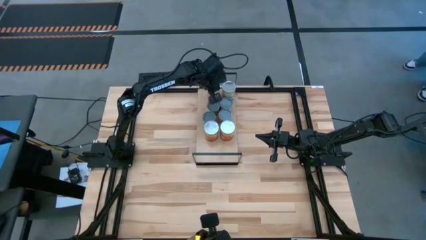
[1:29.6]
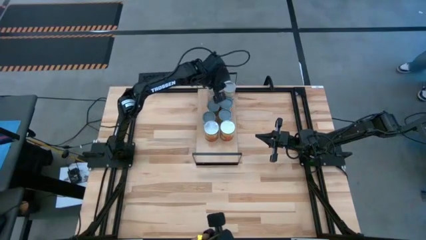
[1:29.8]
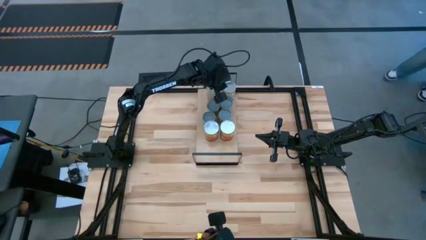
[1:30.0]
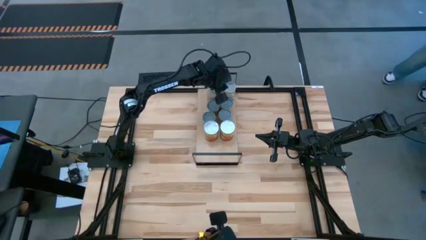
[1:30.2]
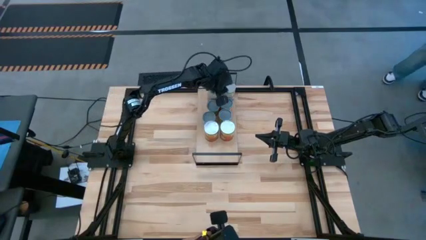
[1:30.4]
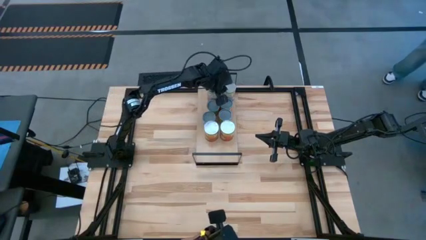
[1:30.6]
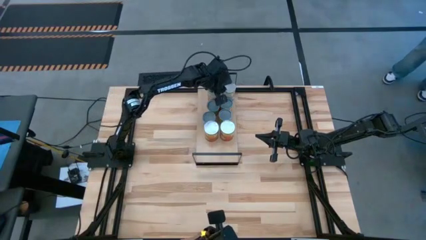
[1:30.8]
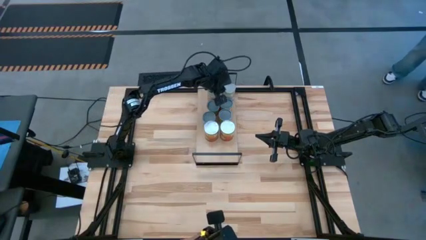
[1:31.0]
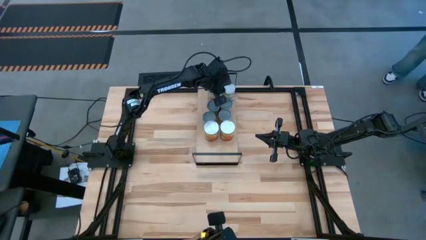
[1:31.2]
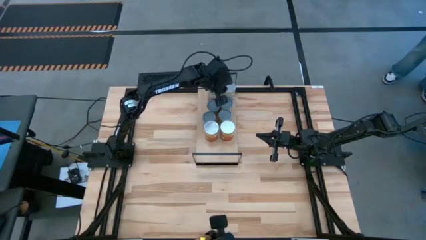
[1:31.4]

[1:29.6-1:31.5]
Task: Pick and place cans onto a shelf
Adjust the blue can

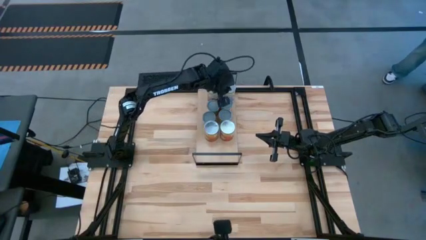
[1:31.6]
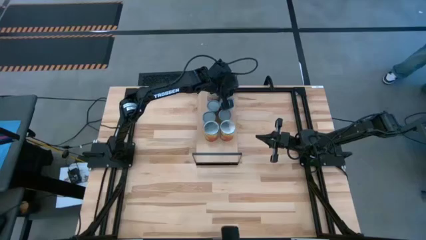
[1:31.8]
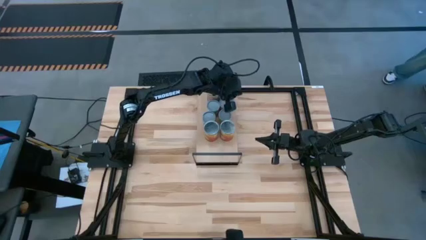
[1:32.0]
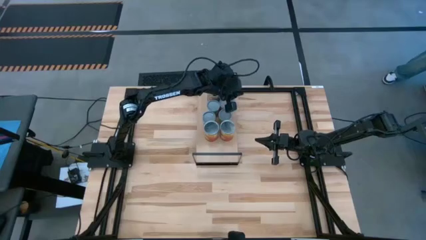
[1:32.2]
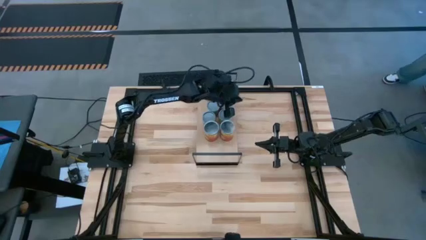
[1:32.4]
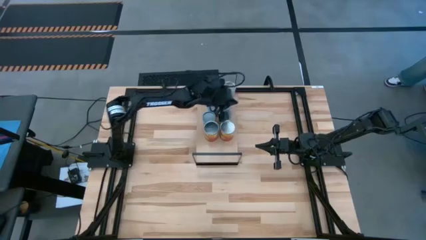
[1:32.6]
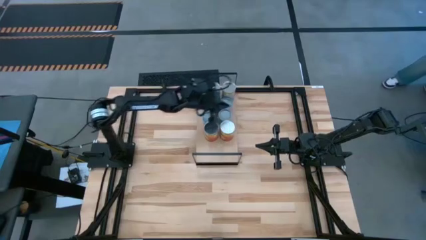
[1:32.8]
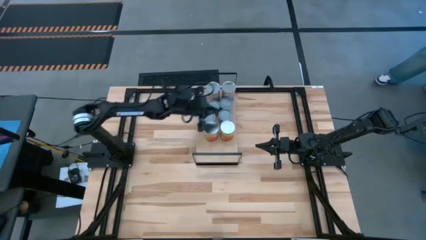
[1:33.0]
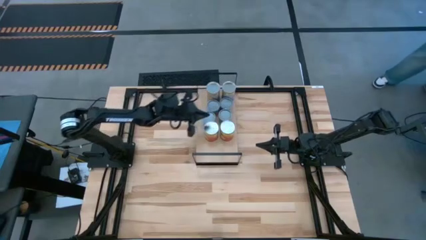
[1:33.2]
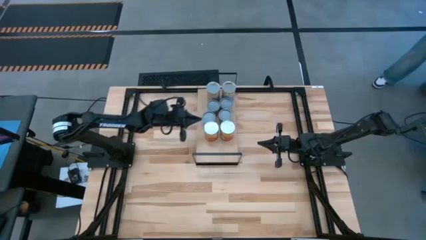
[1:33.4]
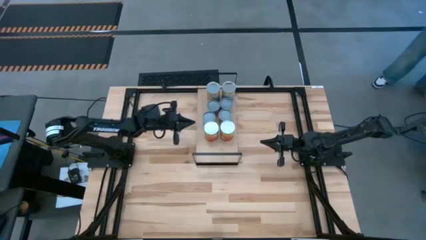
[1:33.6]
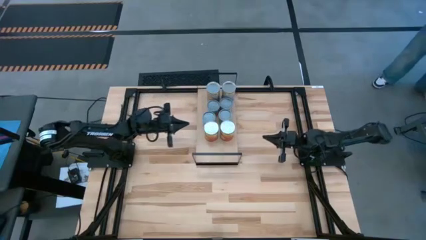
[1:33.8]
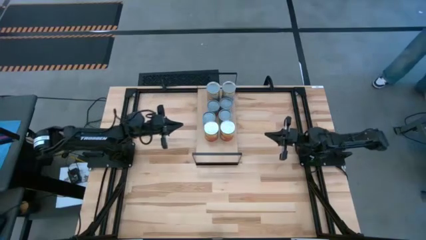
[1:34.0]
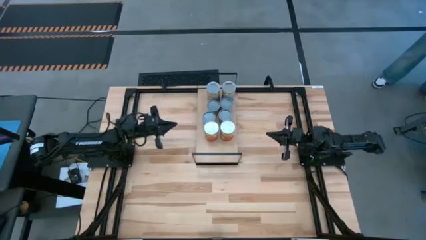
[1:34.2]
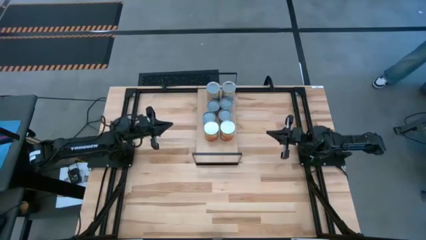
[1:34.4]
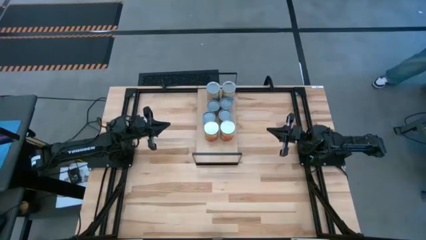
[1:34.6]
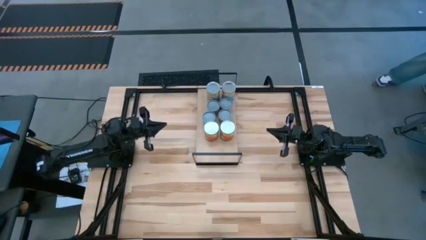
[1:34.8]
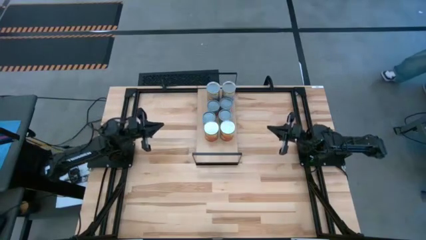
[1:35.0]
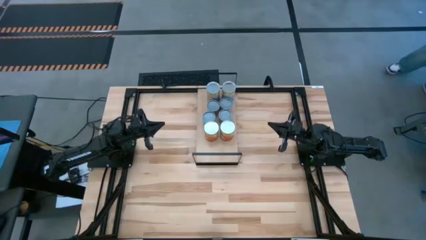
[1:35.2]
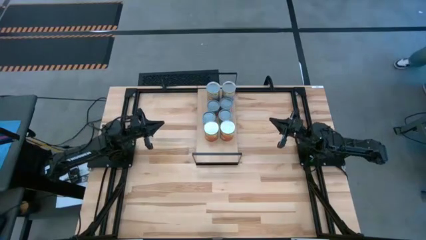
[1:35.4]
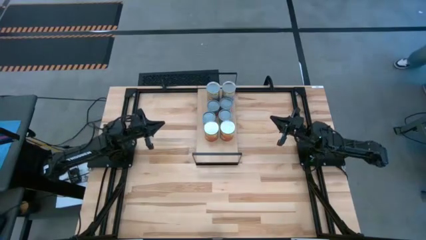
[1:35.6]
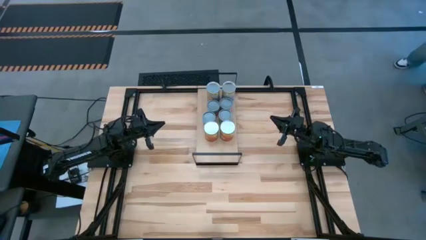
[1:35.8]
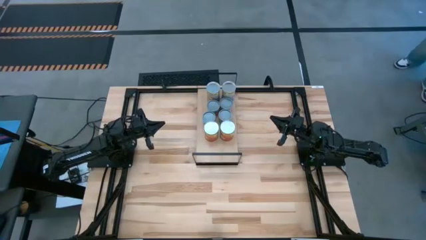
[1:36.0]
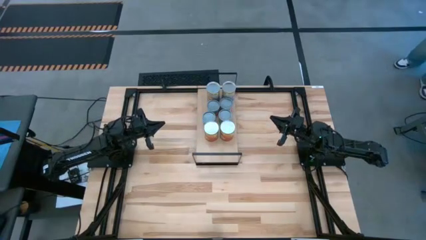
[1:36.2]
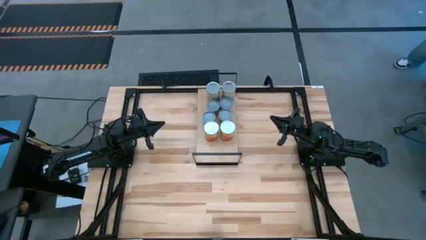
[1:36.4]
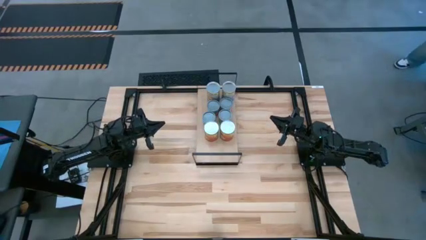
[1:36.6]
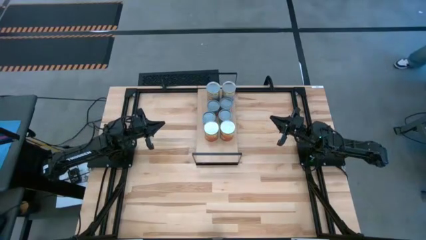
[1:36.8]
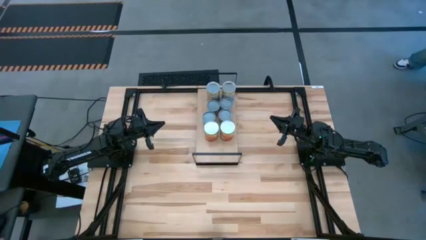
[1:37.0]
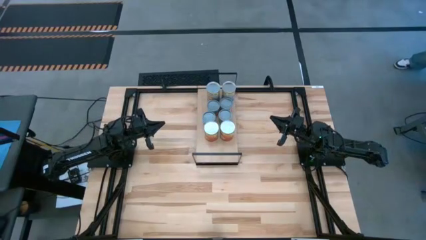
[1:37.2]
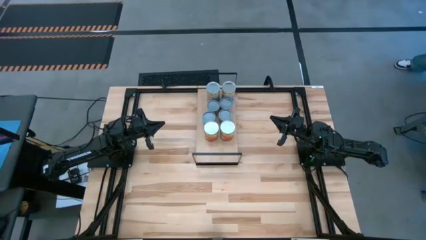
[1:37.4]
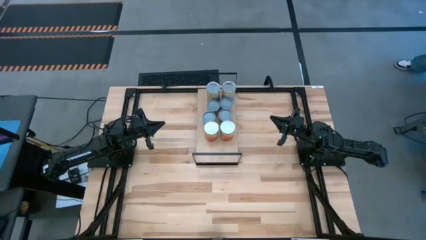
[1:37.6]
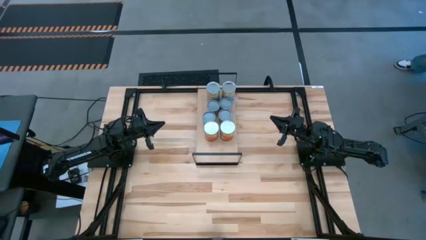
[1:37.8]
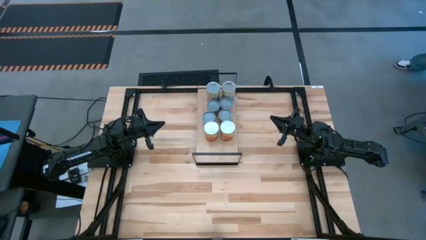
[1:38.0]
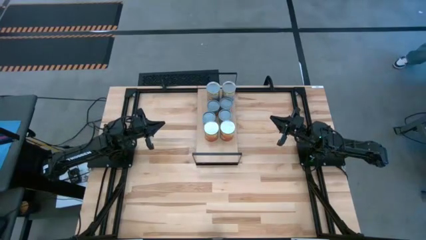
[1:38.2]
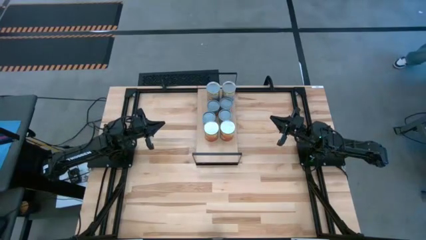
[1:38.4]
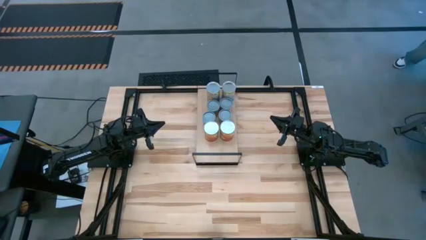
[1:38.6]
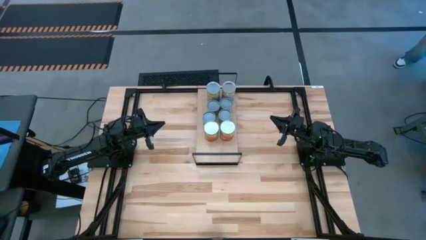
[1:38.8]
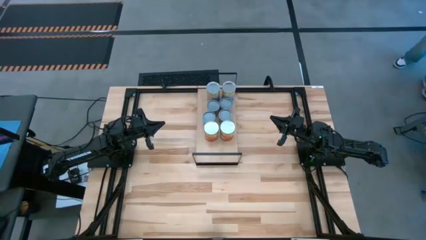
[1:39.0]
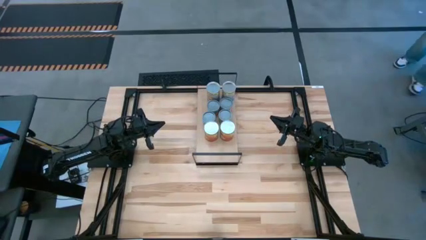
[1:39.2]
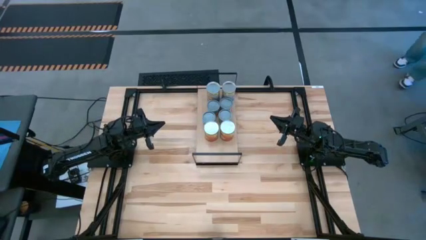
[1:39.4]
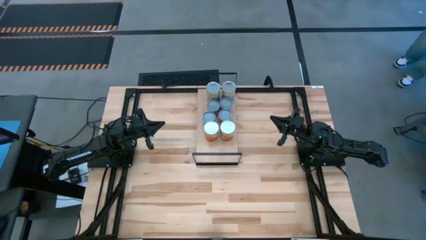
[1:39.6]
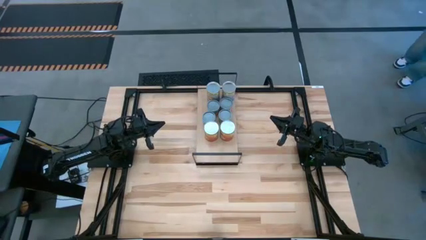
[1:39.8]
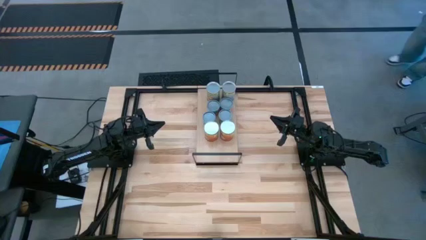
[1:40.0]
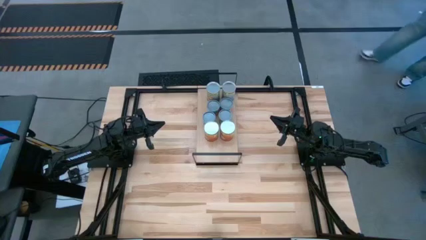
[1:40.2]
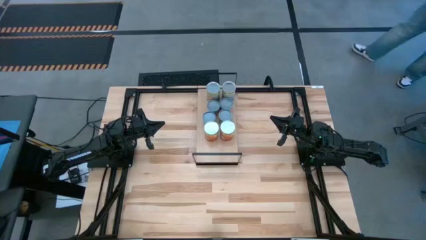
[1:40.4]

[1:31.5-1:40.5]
Return to Home Position
